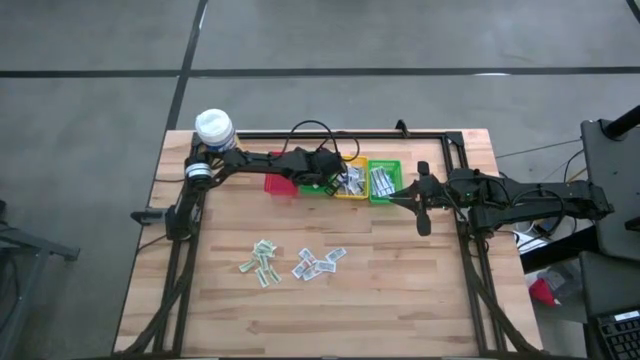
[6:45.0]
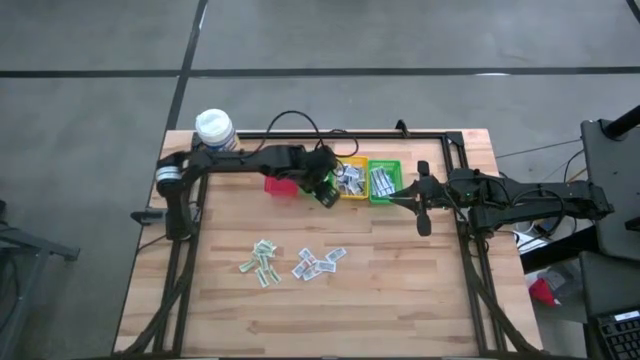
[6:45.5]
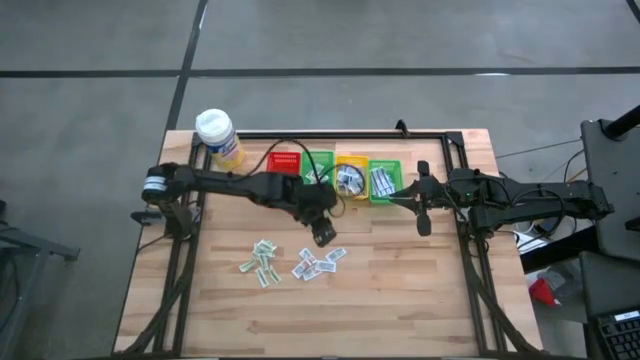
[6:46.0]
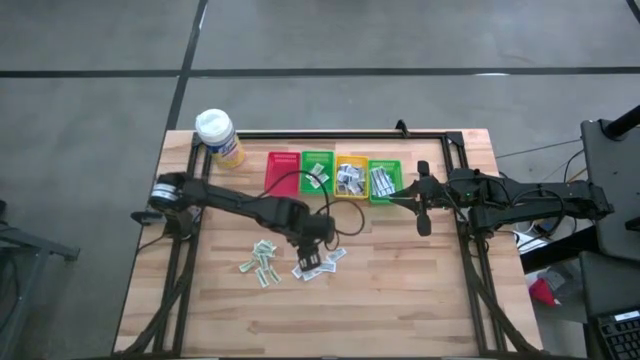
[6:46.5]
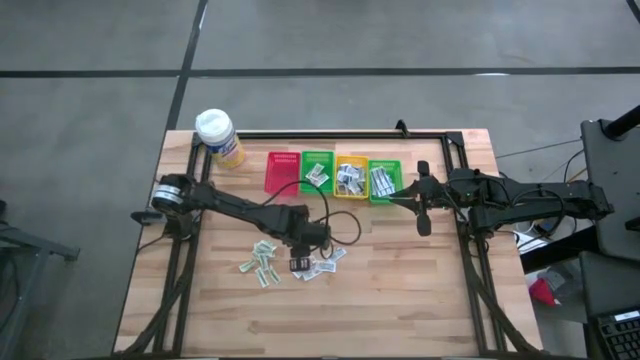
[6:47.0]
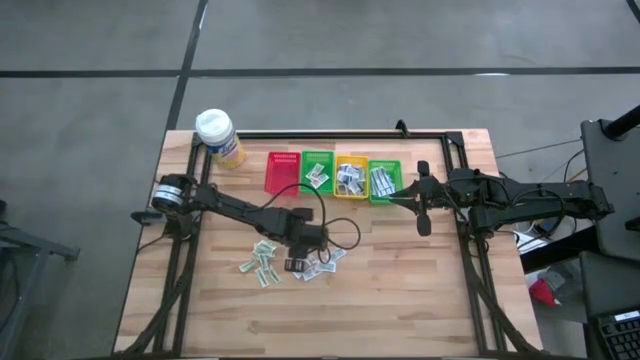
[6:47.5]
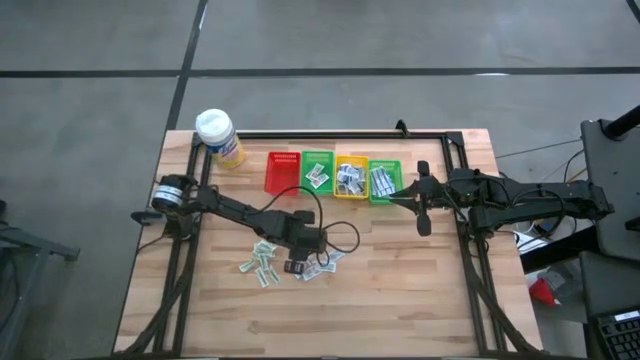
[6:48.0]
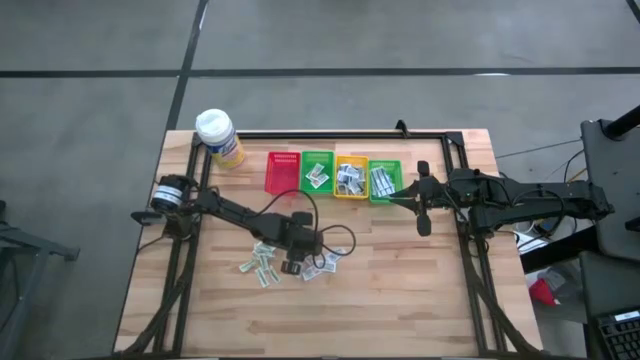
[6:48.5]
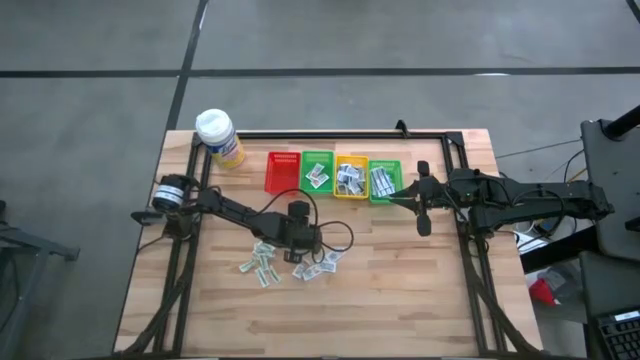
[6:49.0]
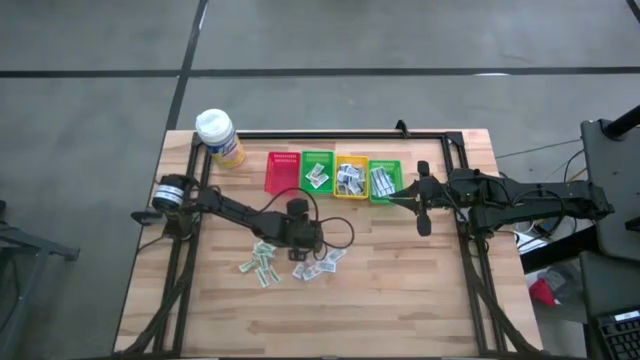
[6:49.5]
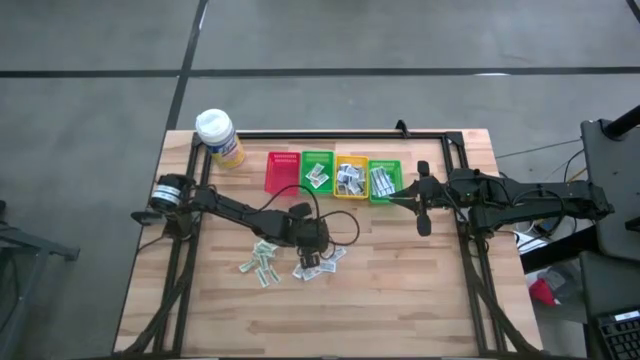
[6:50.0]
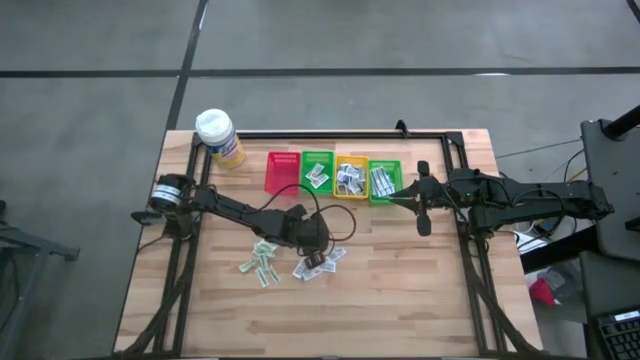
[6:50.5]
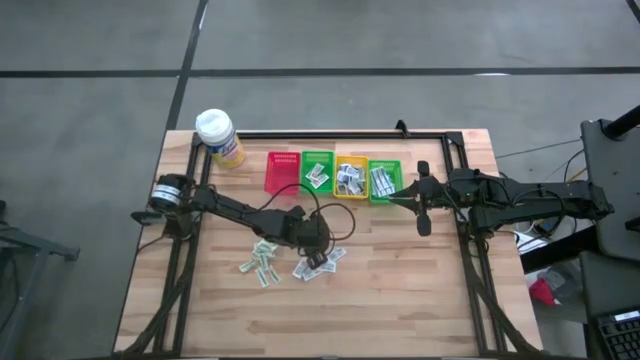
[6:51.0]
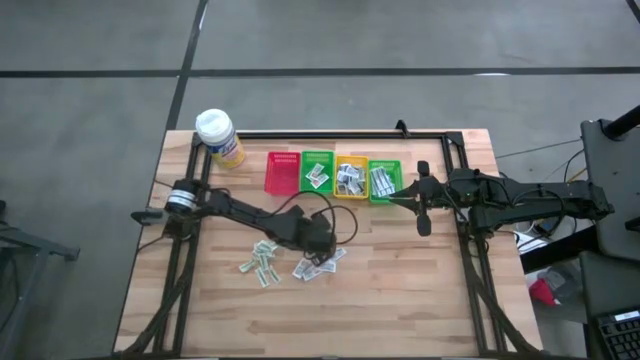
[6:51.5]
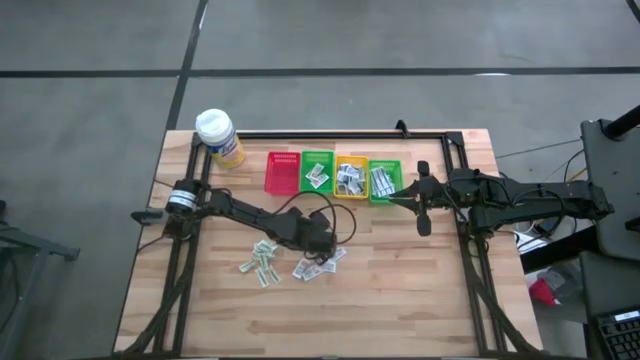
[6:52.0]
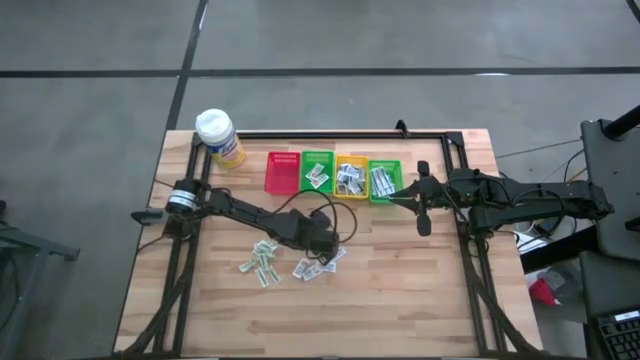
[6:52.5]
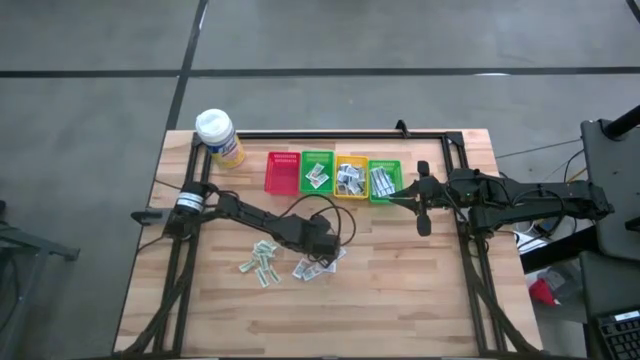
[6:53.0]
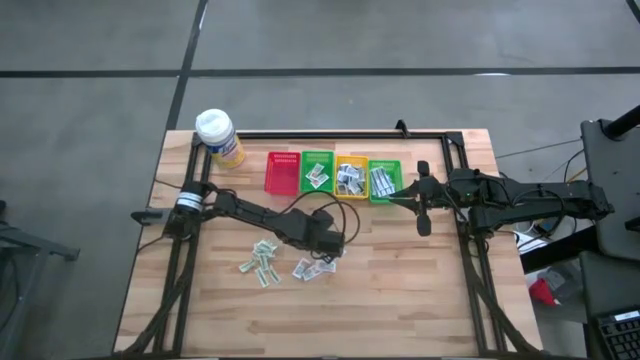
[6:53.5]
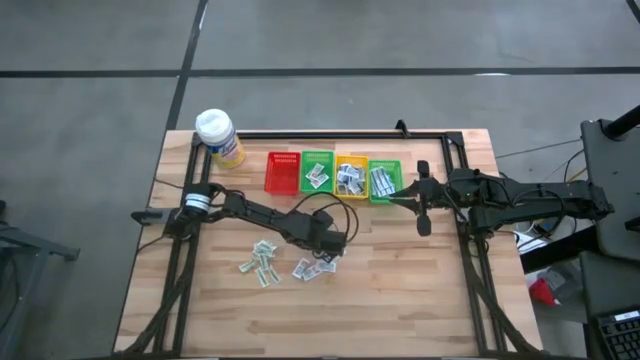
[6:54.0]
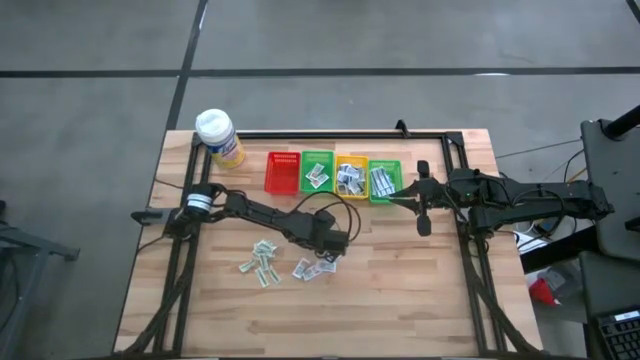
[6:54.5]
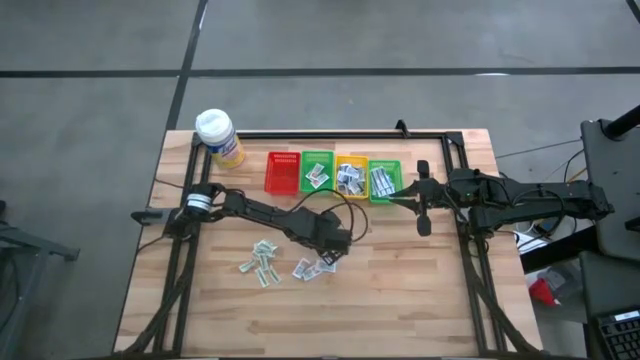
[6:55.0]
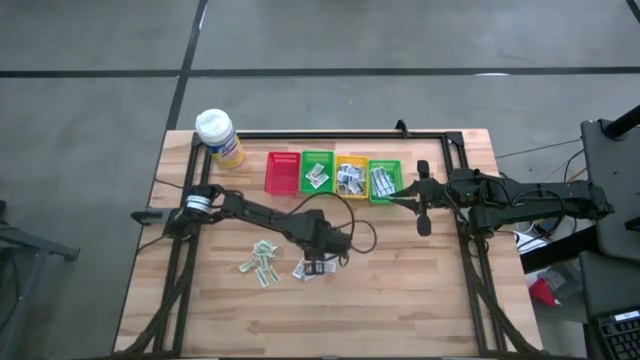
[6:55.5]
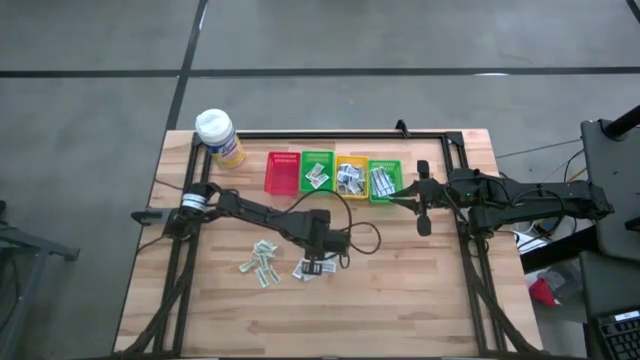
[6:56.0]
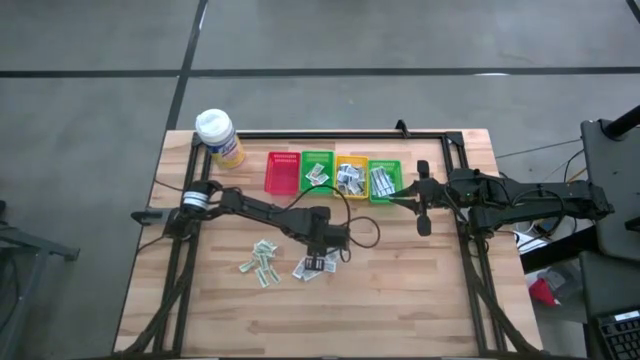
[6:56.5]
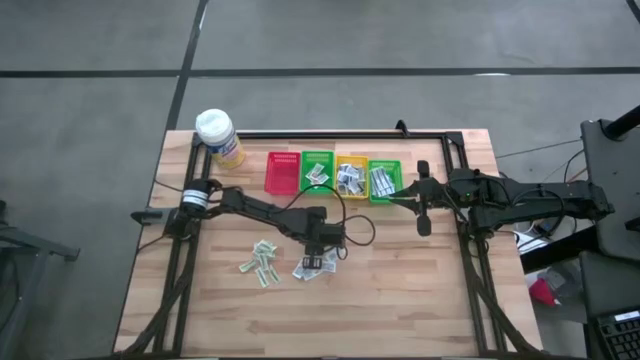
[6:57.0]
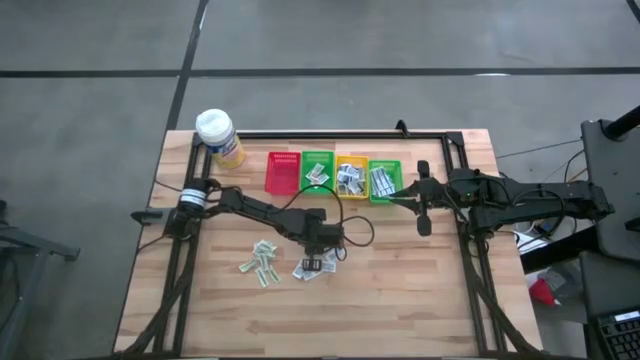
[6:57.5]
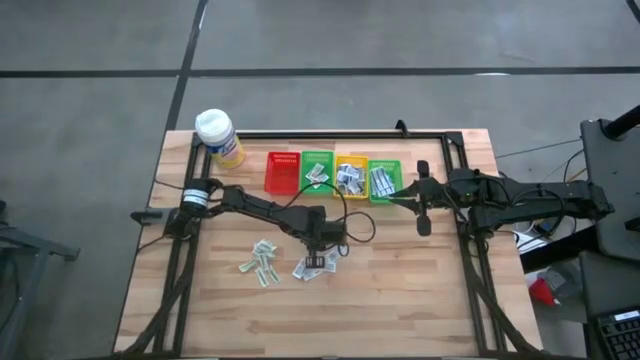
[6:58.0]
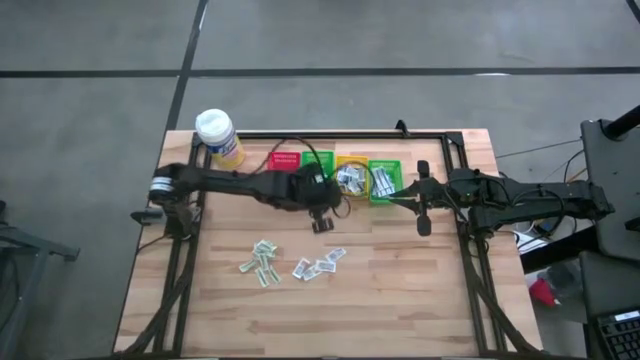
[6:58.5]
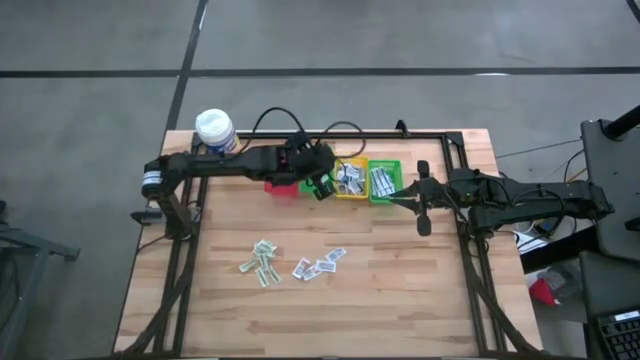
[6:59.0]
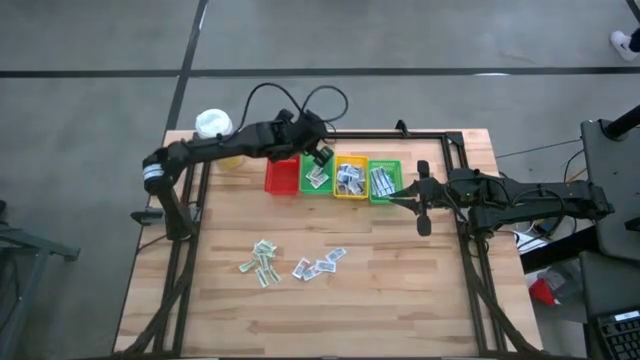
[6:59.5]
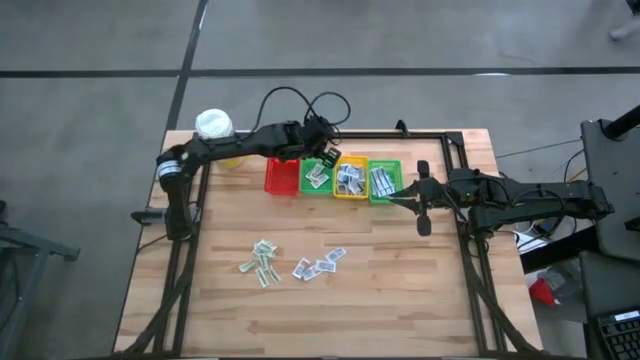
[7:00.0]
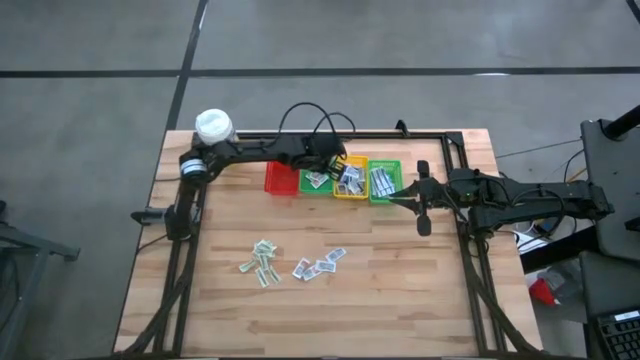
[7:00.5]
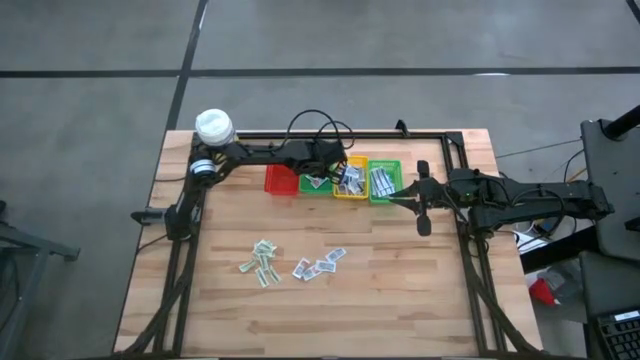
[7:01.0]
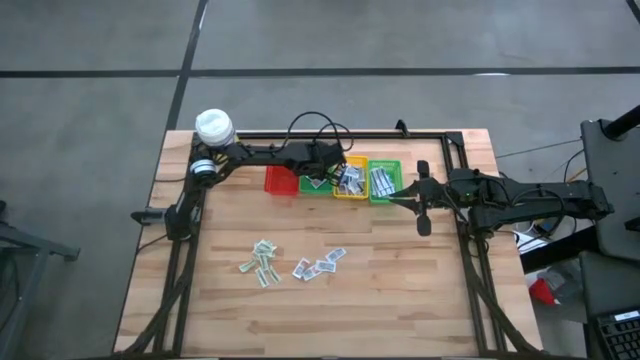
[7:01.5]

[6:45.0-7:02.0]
Task: Pick & Place First Aid Supplies
Put the orange ointment pack into the left green bin

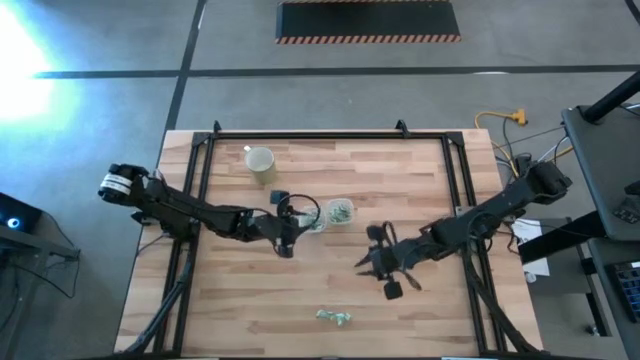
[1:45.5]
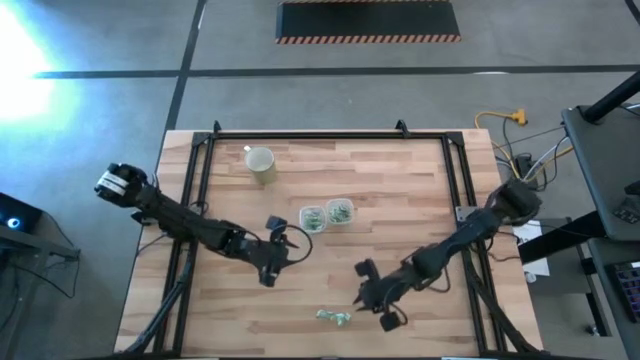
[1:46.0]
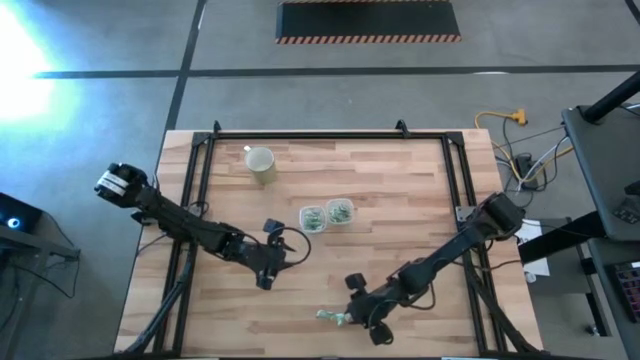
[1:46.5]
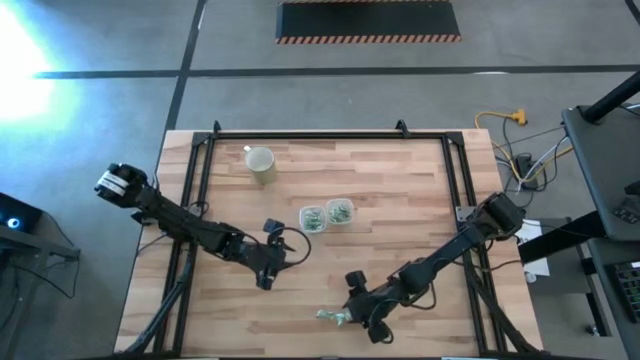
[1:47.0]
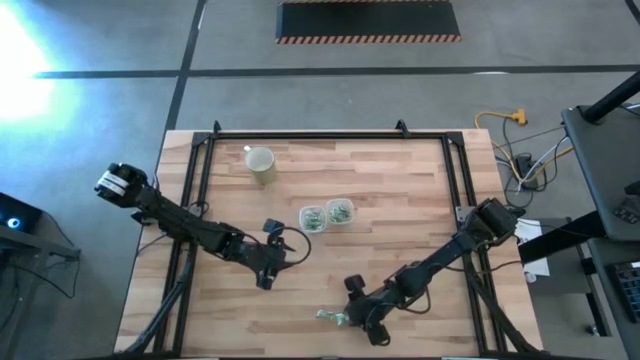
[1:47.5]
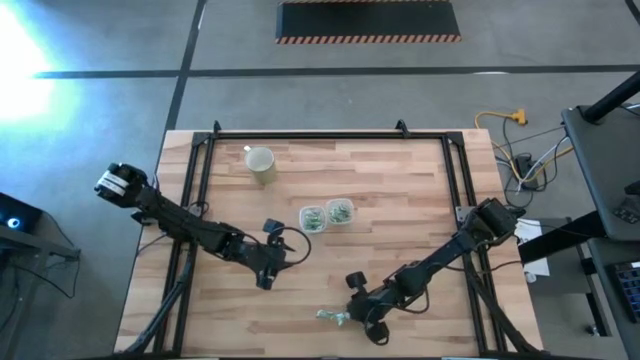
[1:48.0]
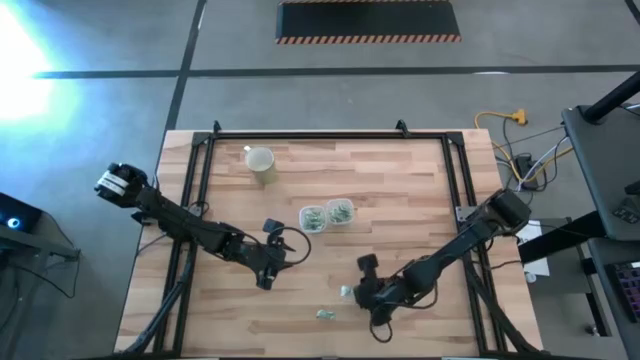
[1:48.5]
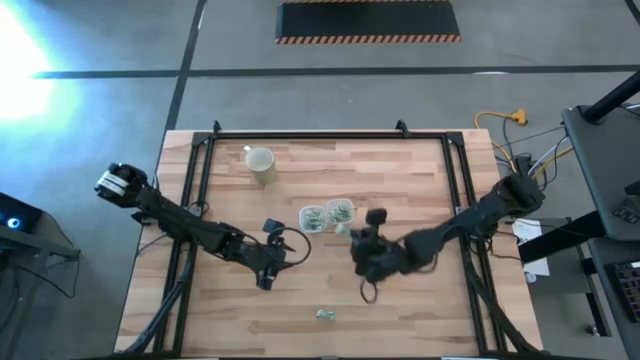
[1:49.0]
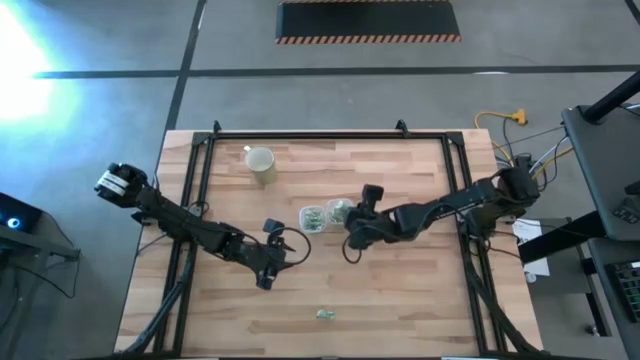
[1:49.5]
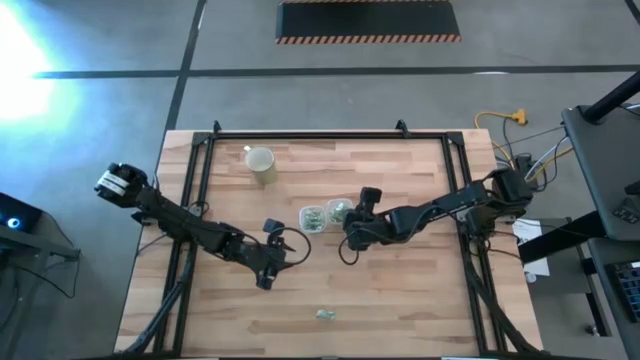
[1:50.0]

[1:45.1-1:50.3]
Task: Pick and place items into bin
Put the stevia packet into the right transparent bin
